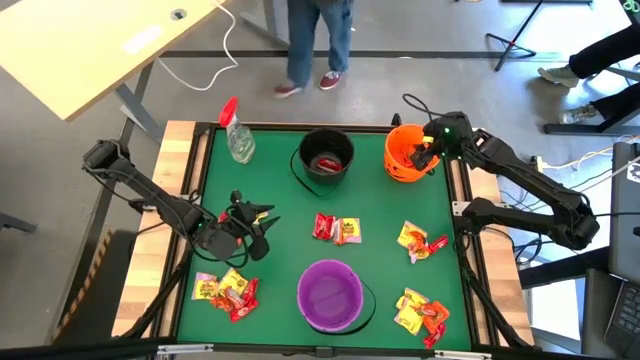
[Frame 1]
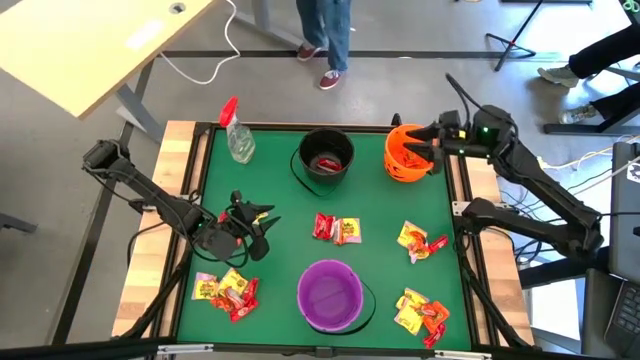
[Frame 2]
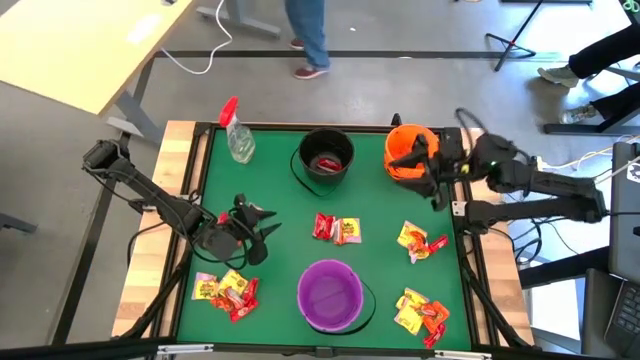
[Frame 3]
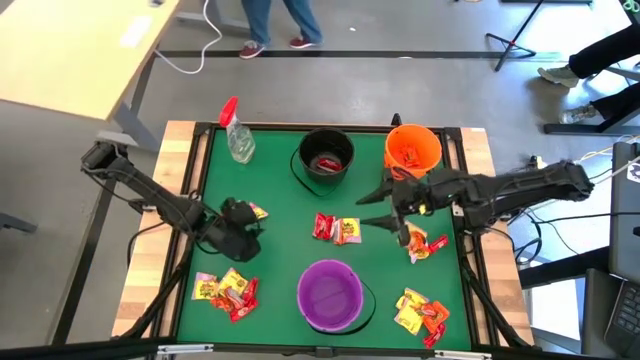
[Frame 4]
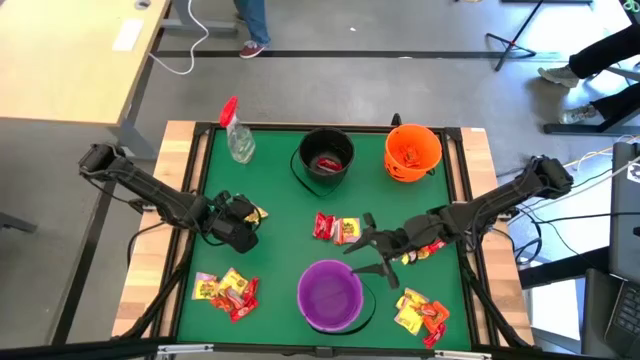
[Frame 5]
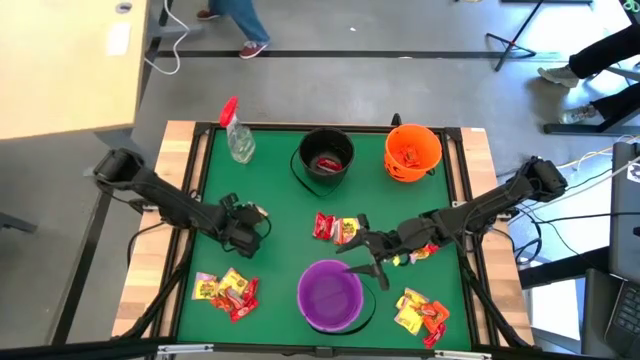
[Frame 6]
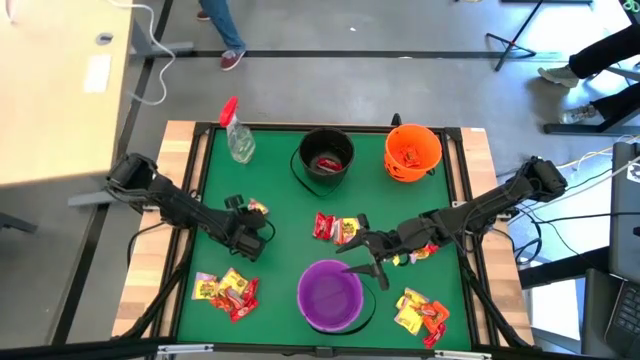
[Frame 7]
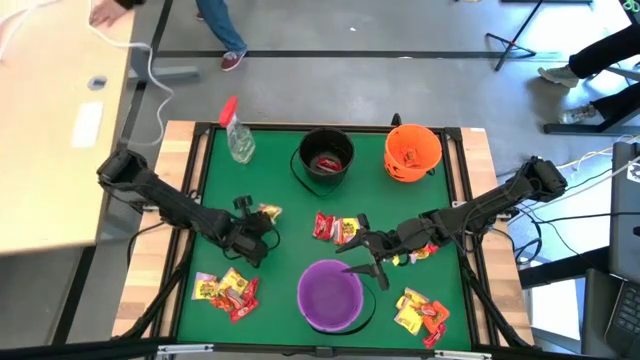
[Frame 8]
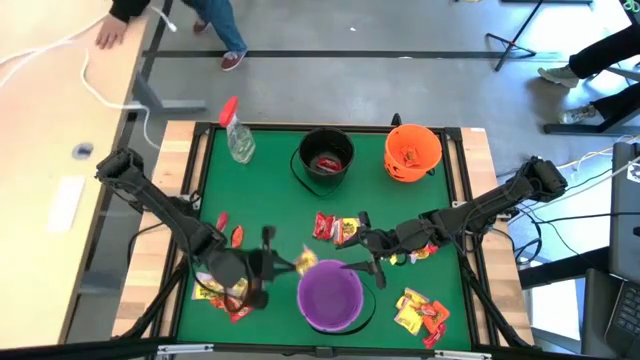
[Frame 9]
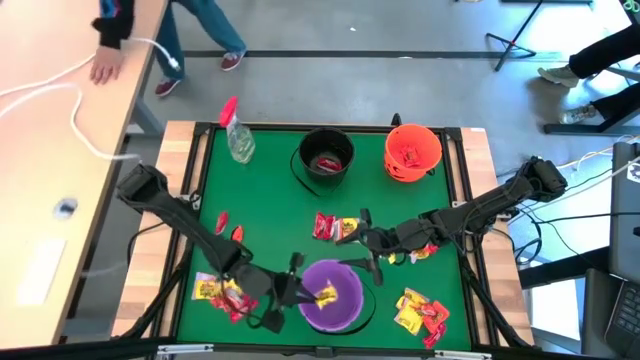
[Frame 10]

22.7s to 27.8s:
Task: Organize candy in baskets
Put the yellow candy pack into the purple bucket

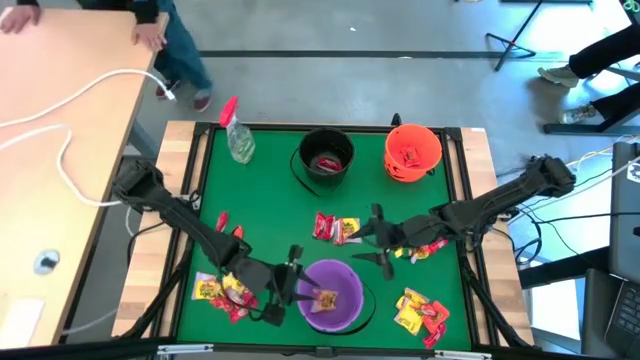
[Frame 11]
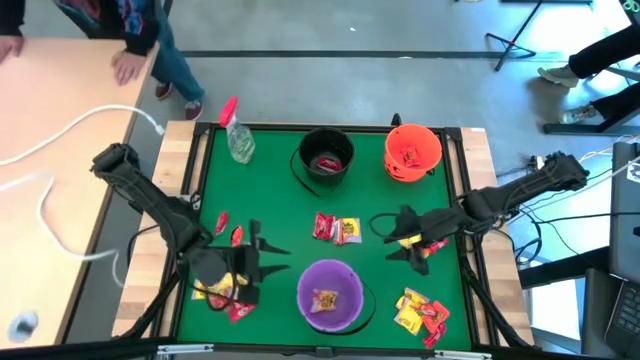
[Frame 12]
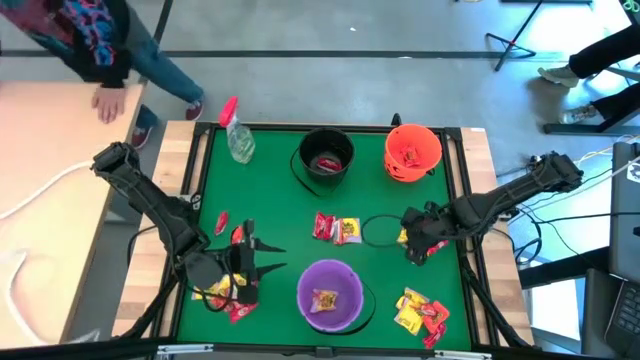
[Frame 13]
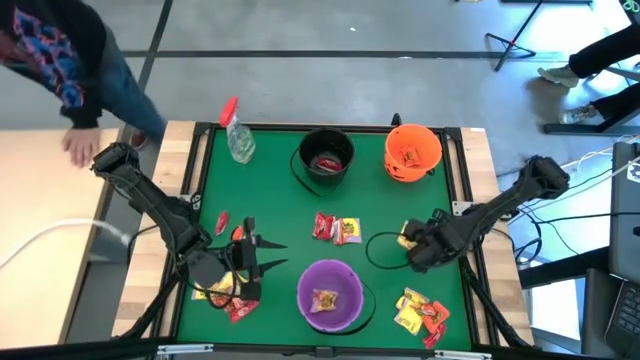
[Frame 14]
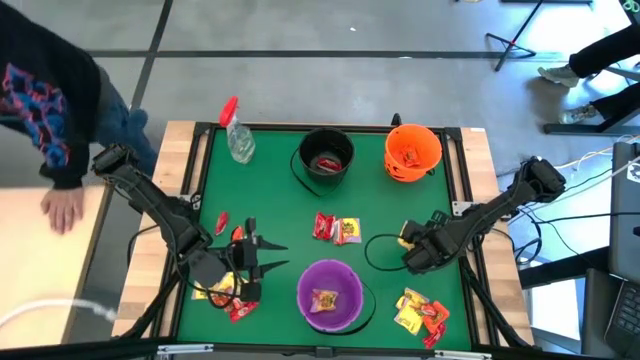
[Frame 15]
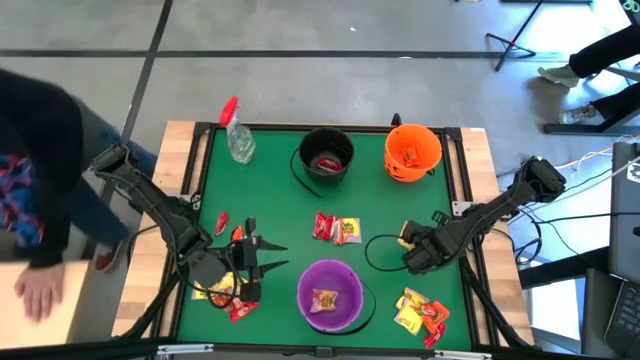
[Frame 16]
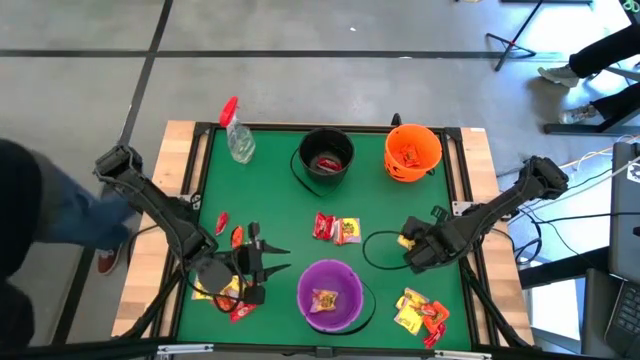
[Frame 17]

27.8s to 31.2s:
Put the orange candy pack into the orange bucket

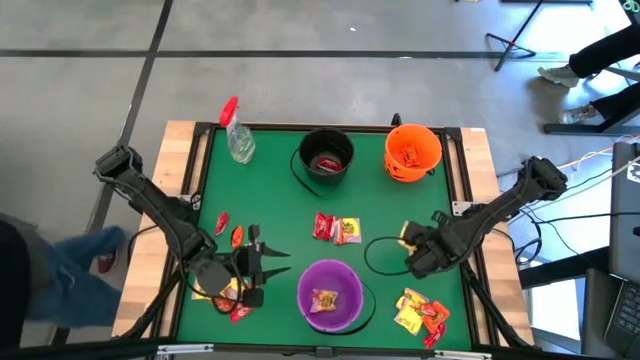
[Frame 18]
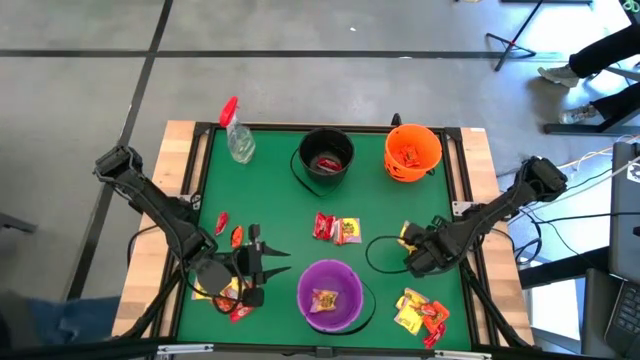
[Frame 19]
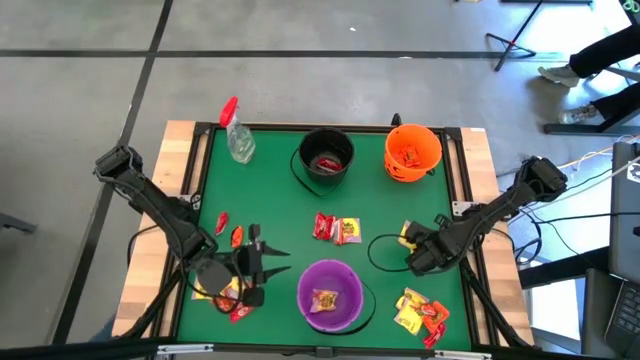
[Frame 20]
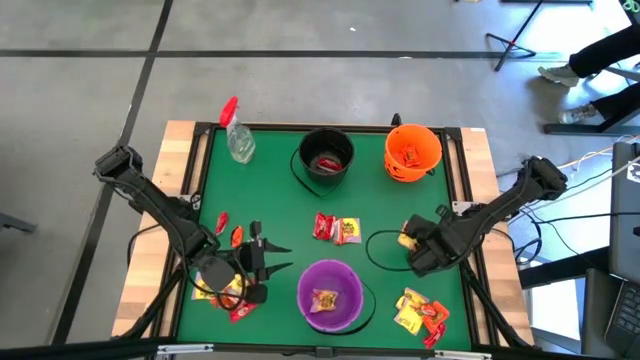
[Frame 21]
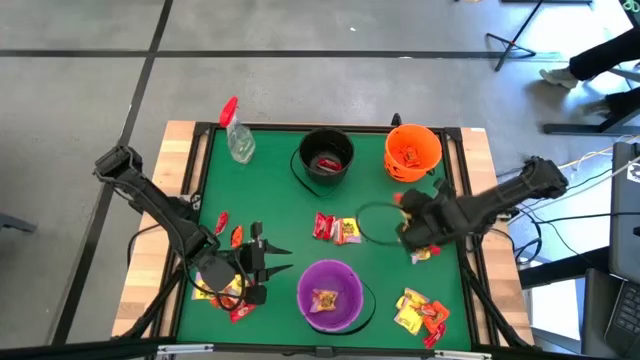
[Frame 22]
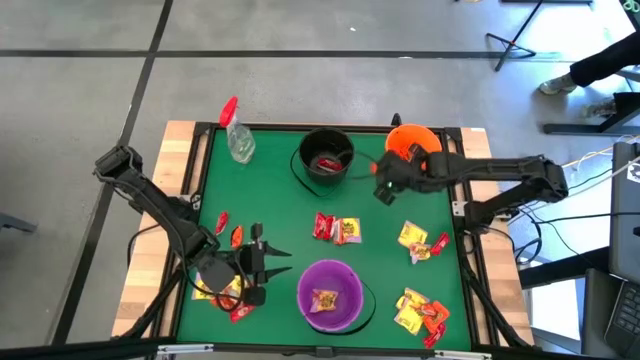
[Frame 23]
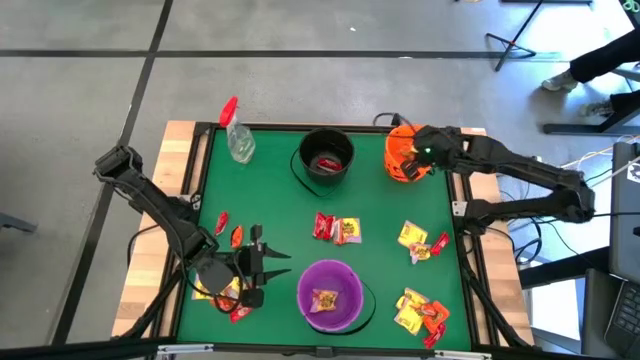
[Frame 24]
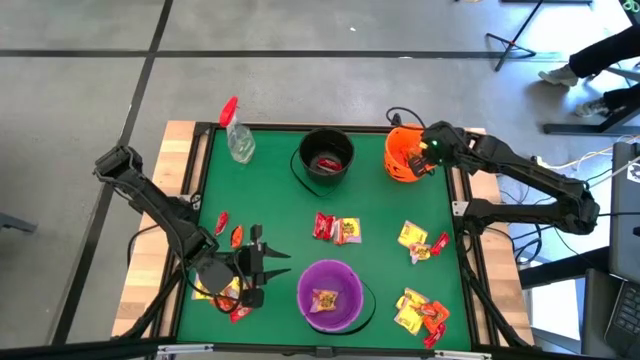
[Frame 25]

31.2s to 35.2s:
Put the orange candy pack into the orange bucket

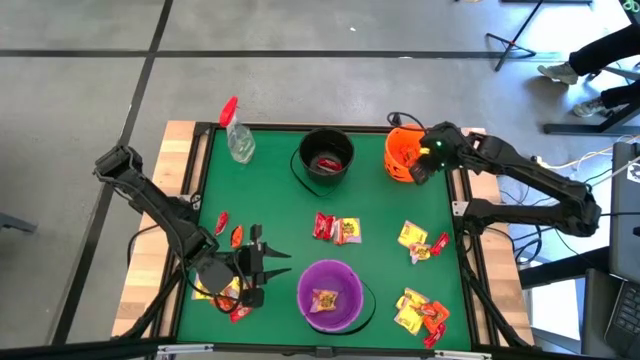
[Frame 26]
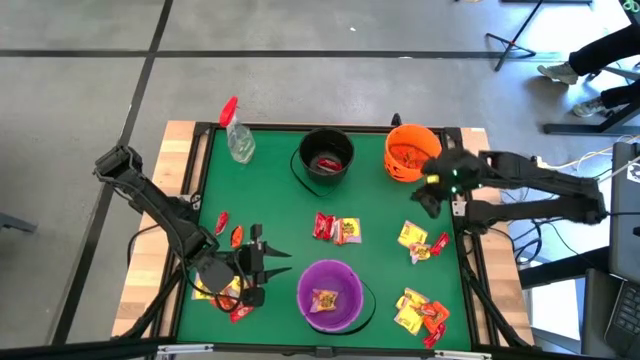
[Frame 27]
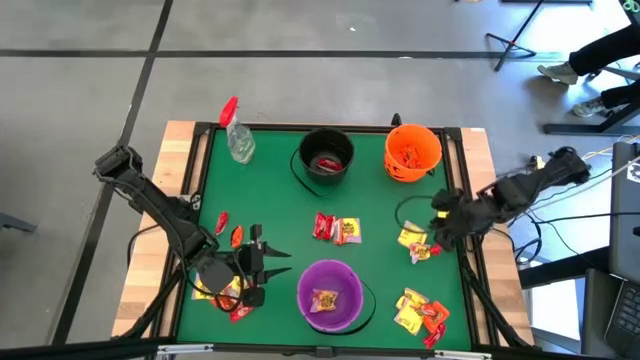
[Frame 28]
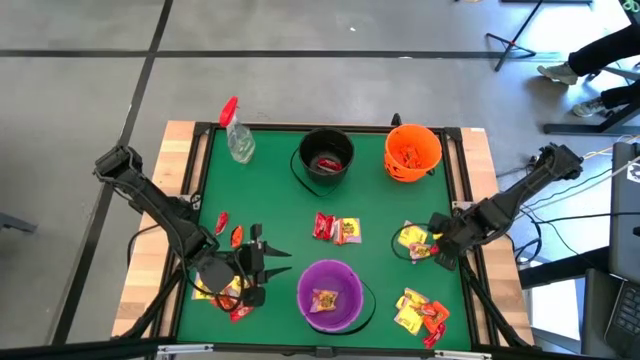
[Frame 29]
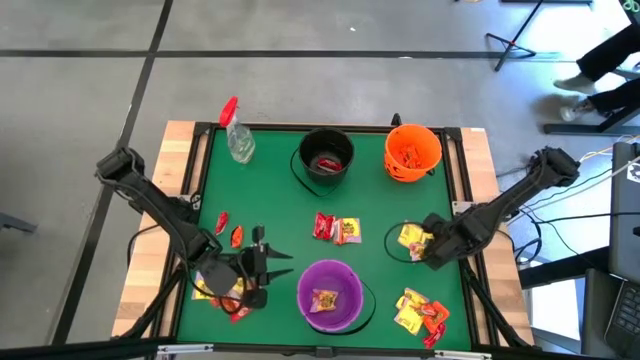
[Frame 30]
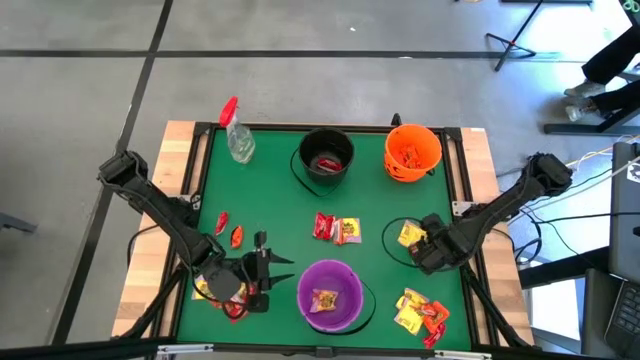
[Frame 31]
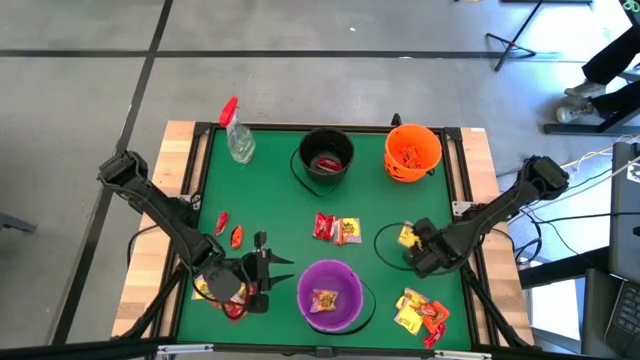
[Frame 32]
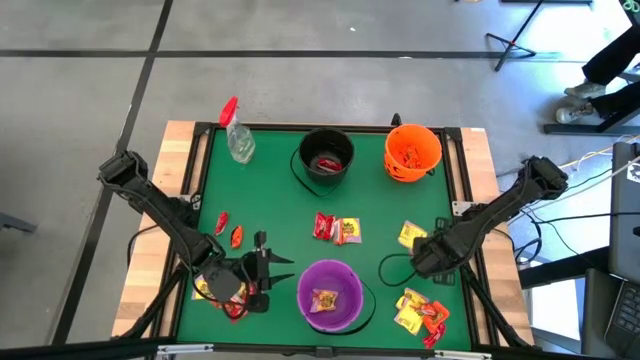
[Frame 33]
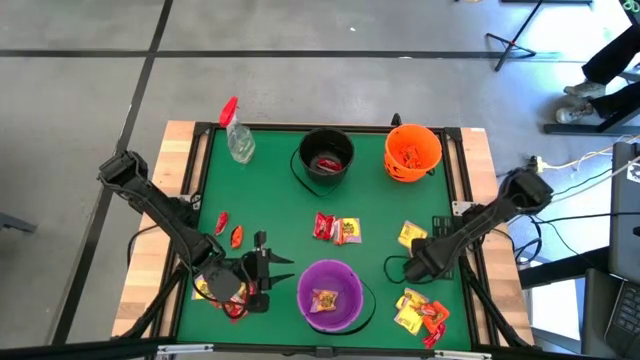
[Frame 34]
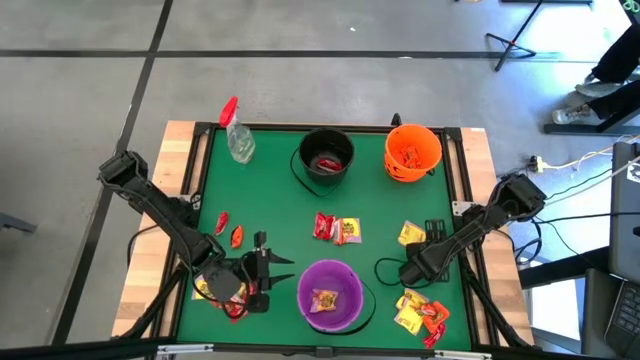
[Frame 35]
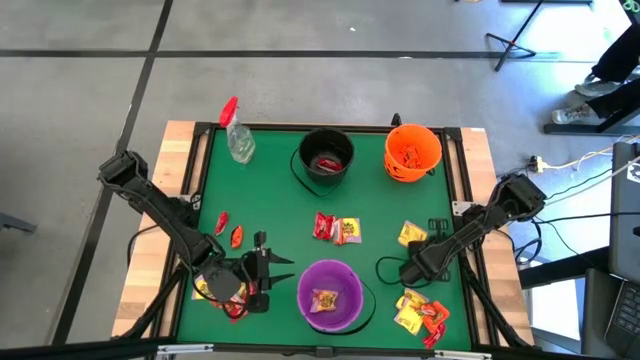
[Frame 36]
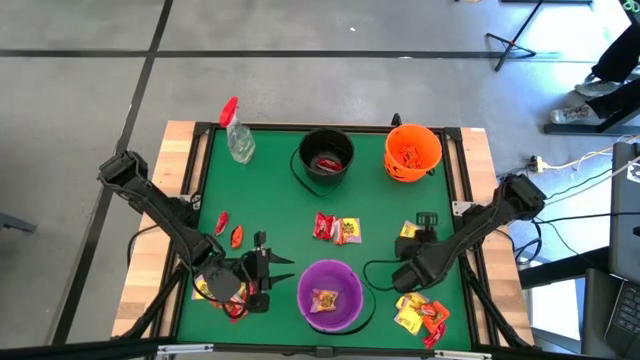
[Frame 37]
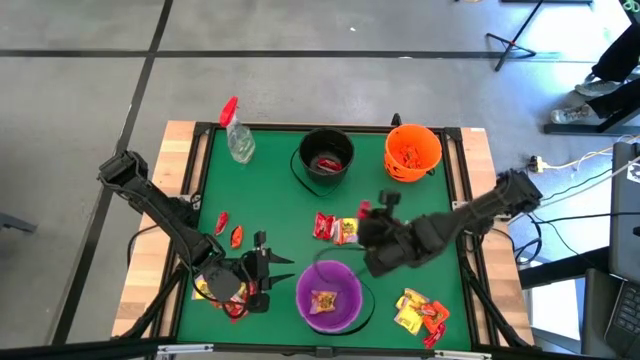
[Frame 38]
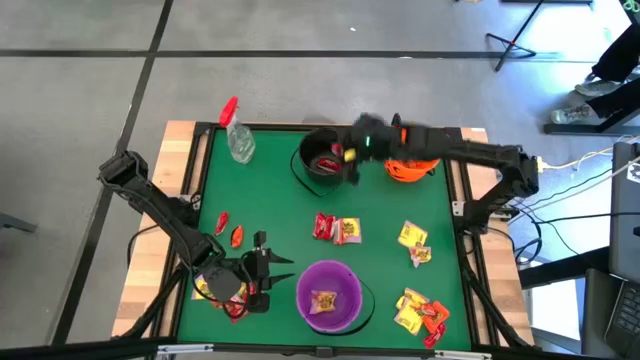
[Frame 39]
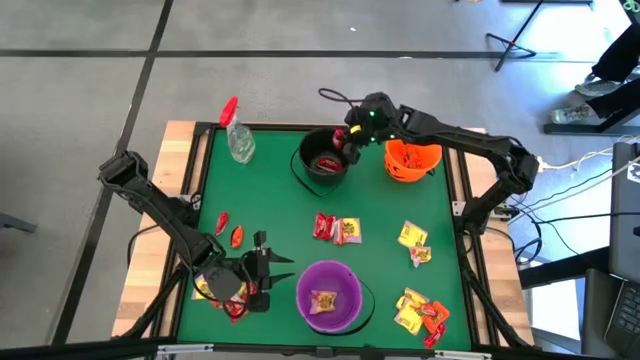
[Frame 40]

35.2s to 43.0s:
Put the red candy pack into the black bucket

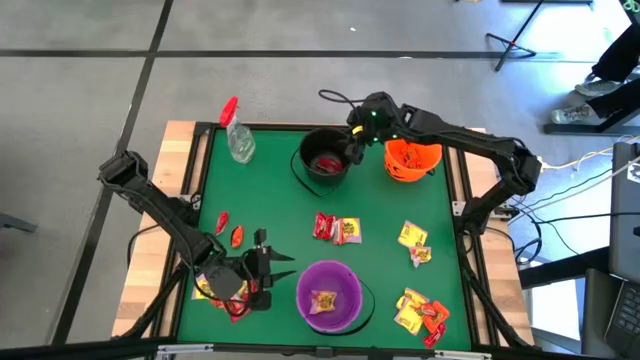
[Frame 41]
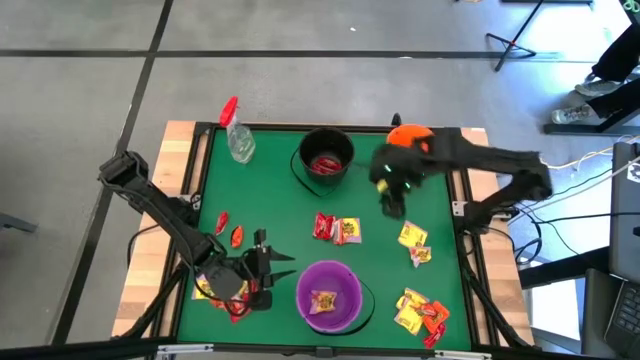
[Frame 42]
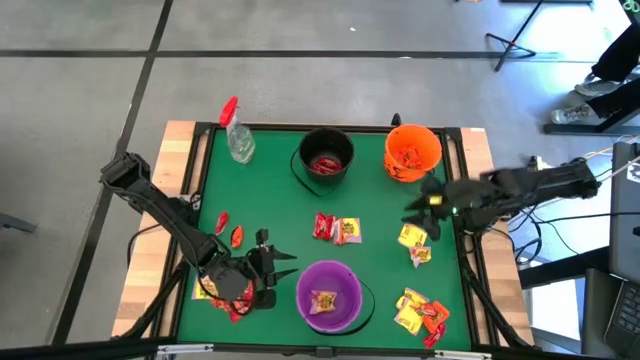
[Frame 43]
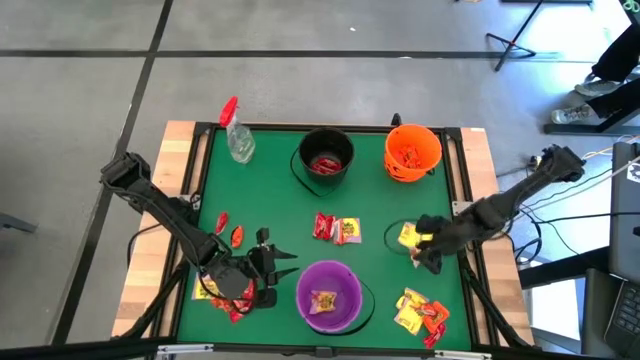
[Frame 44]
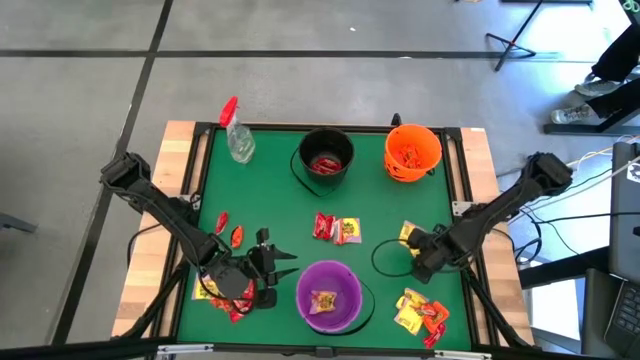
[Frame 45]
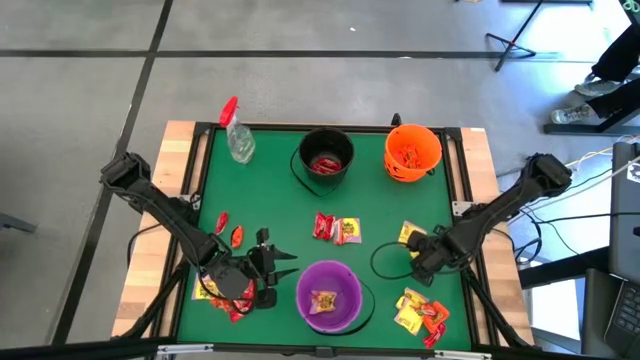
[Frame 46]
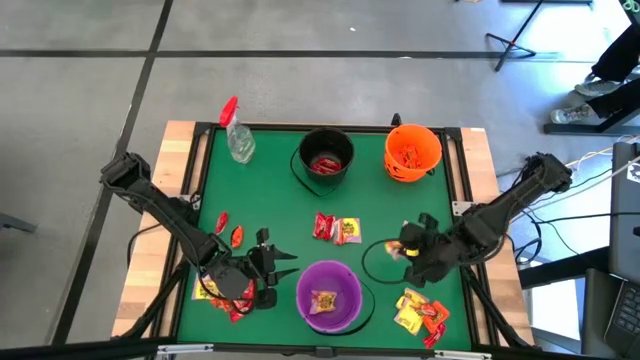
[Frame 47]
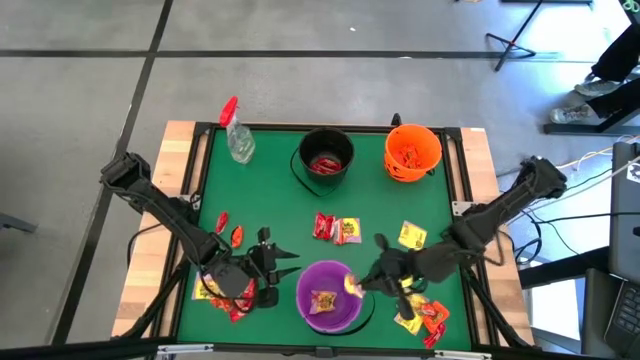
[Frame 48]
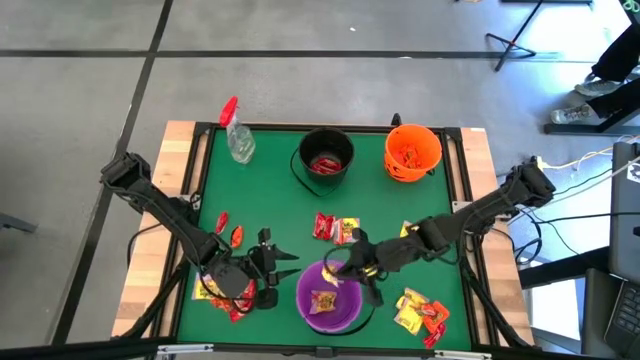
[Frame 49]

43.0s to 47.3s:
Put the yellow candy pack into the purple bucket
